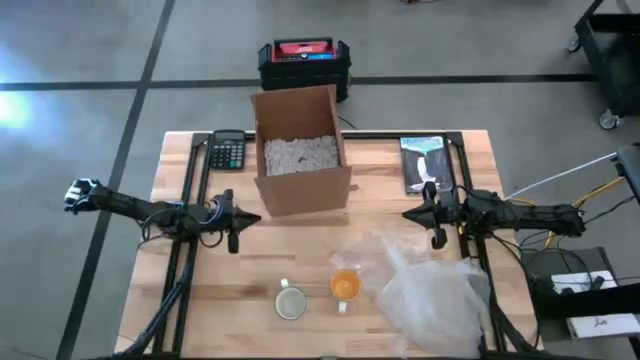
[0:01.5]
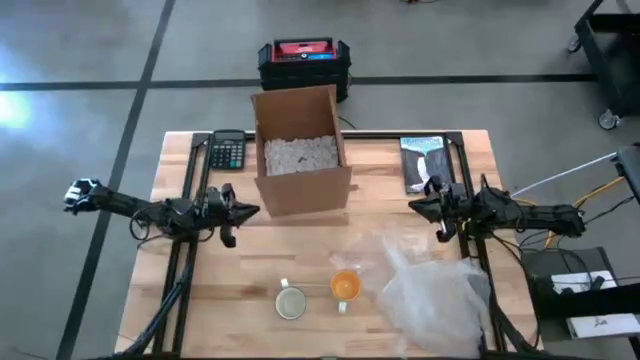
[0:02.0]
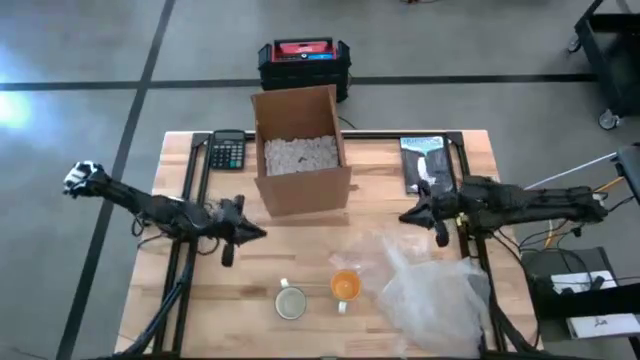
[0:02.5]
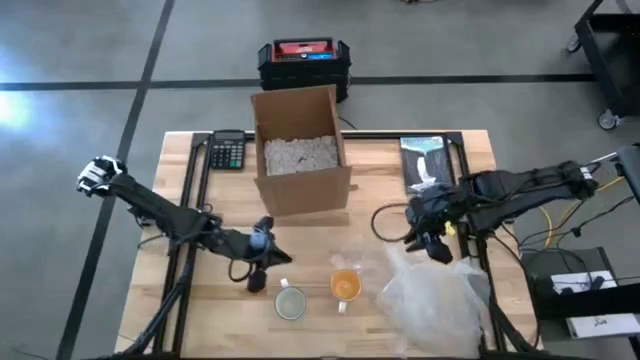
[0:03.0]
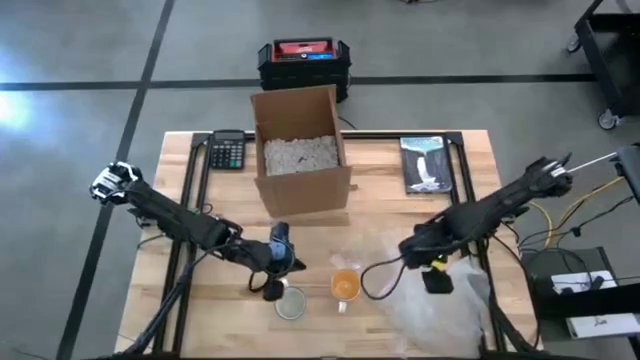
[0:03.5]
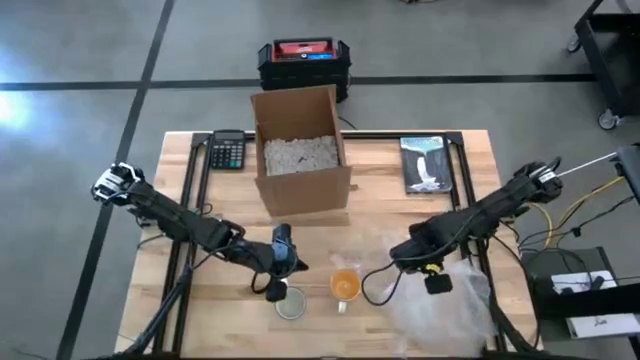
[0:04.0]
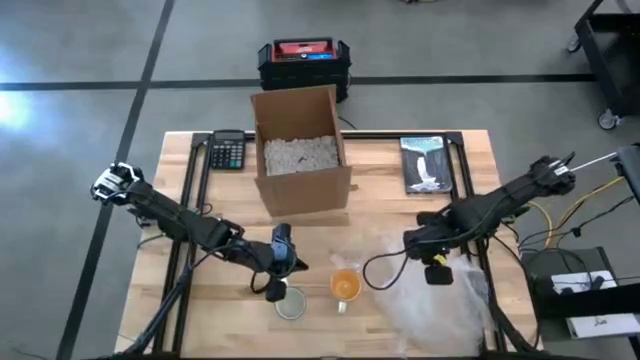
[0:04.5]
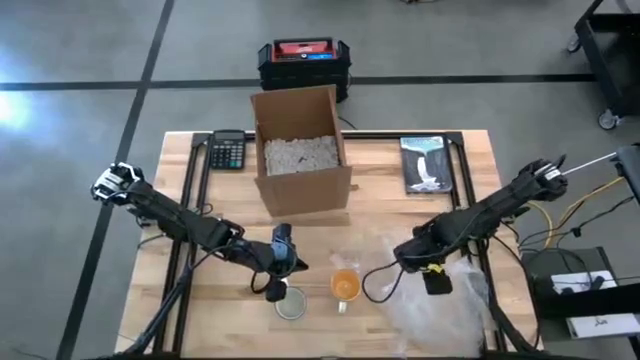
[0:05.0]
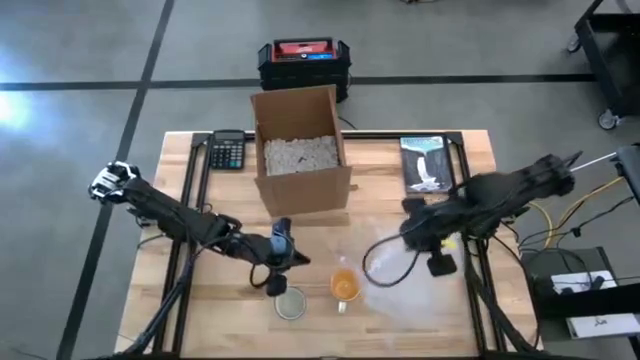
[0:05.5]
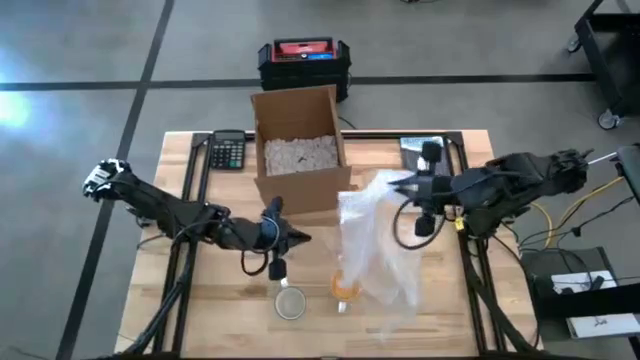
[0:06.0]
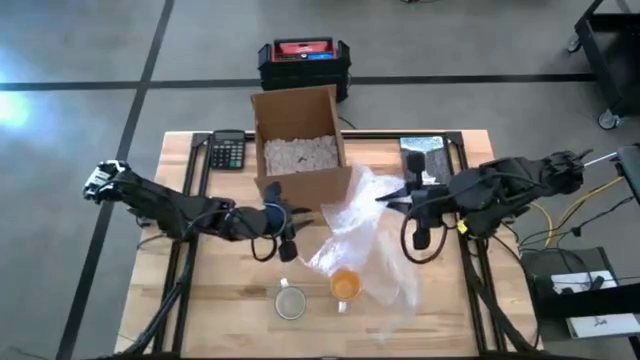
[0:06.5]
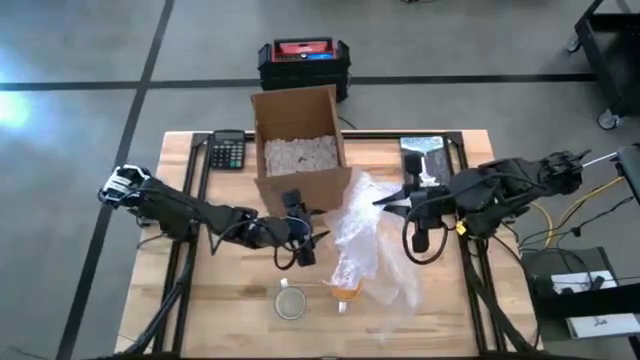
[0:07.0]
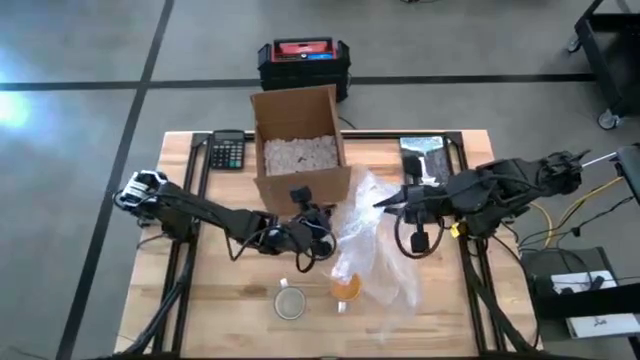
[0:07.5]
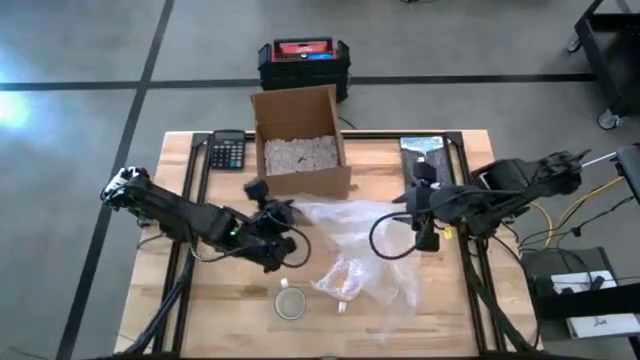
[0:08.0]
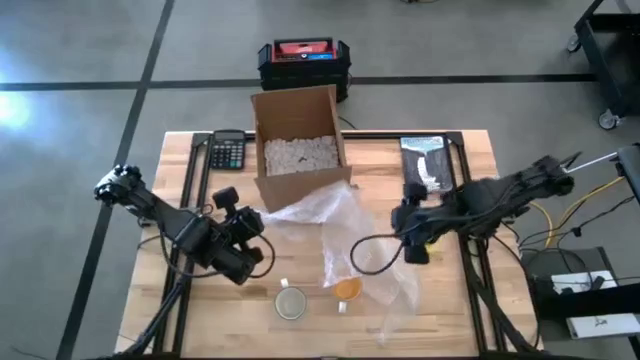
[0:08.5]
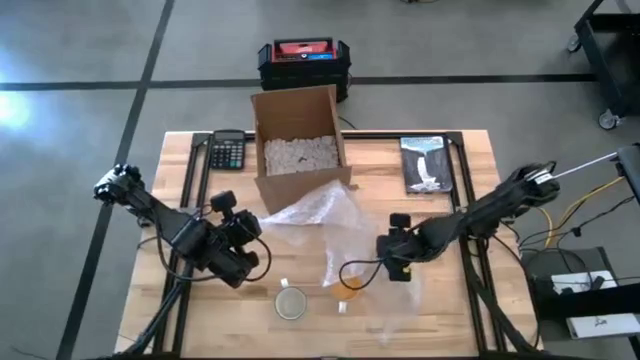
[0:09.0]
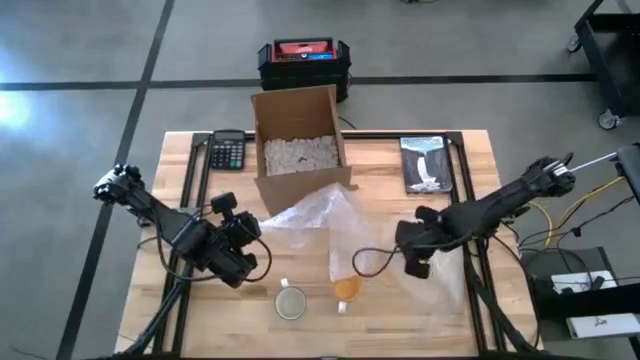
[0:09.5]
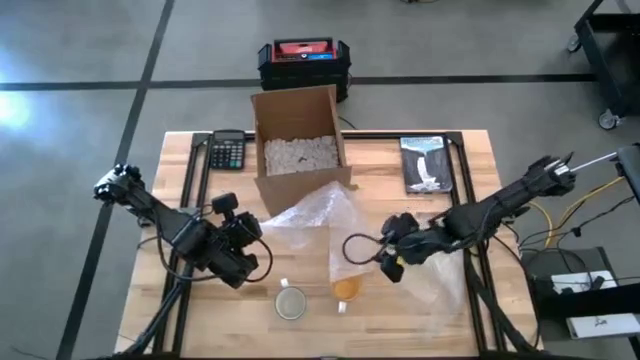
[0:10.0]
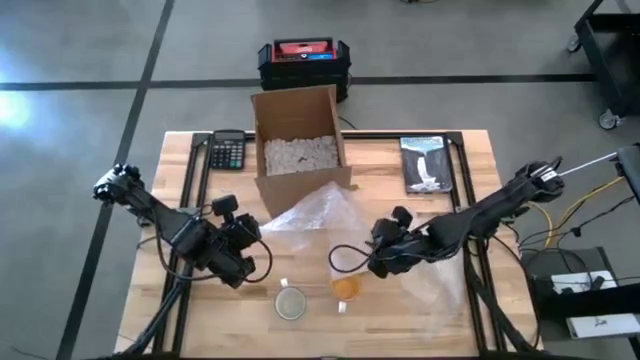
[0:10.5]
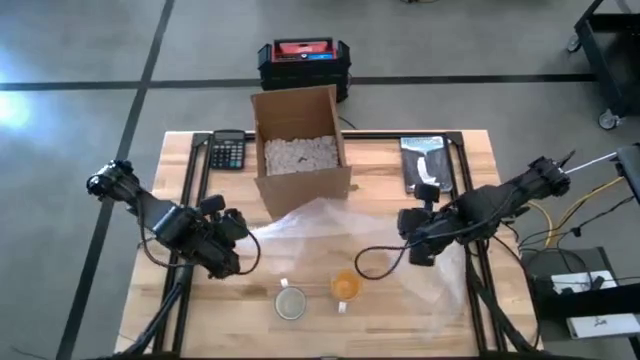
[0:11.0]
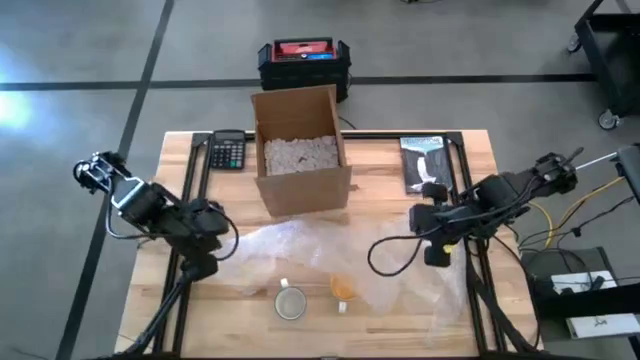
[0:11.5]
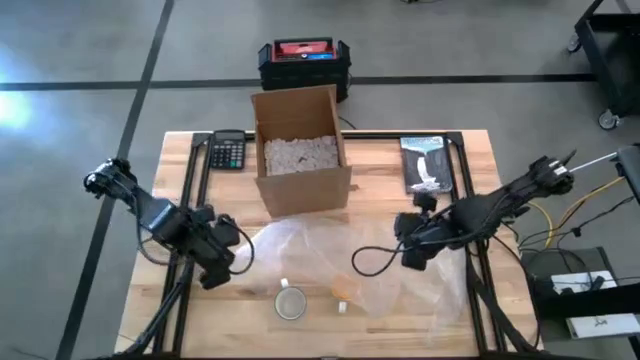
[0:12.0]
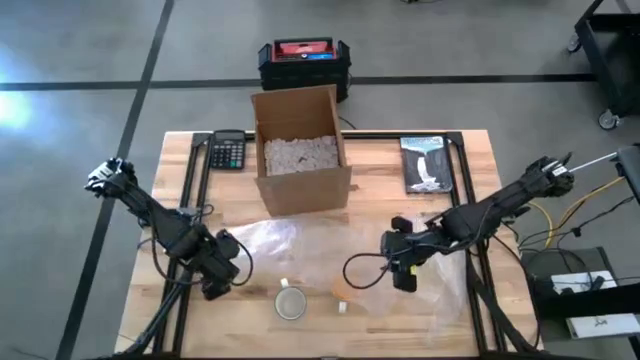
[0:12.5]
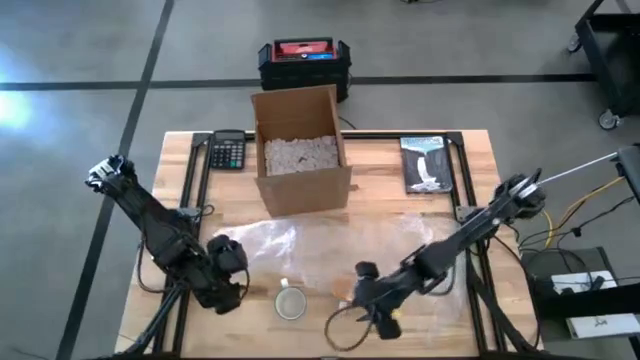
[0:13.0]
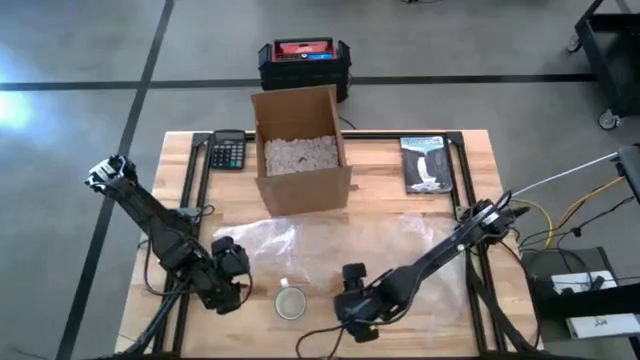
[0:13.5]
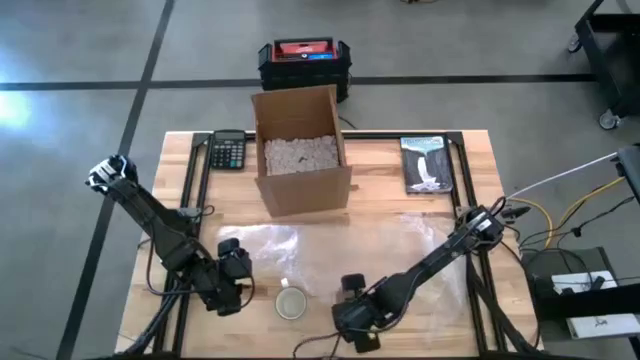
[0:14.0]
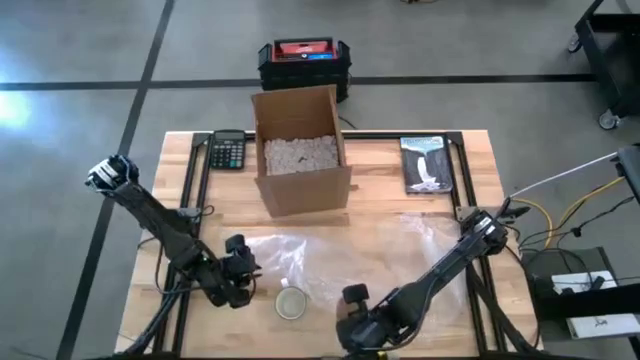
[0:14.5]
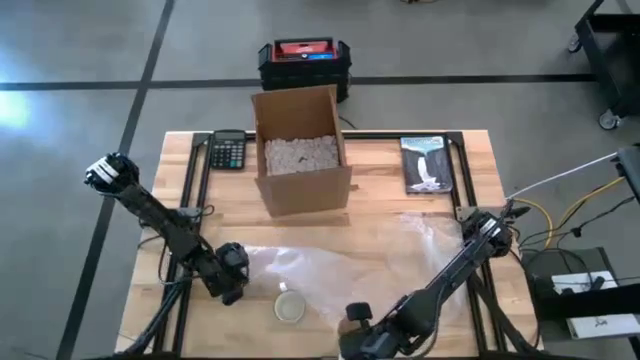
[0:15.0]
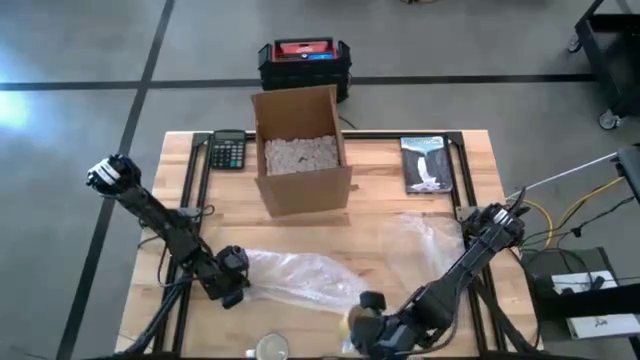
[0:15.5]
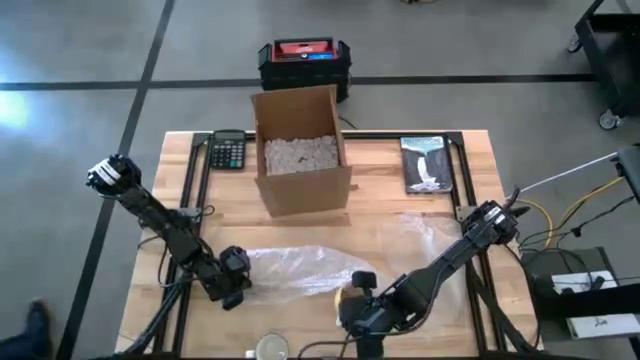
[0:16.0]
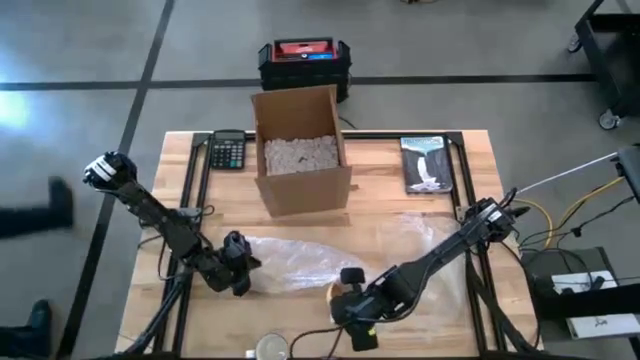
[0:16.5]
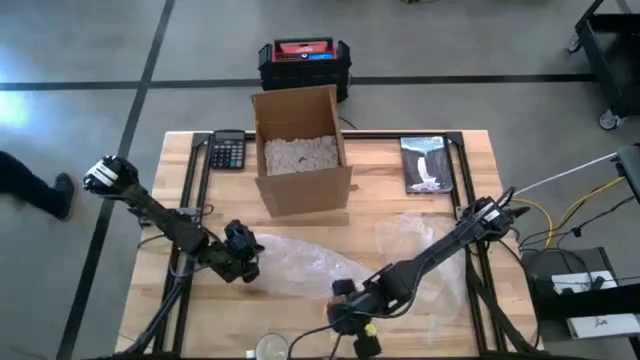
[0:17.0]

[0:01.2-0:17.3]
Task: wrap mug
Prepare the transparent bubble wrap

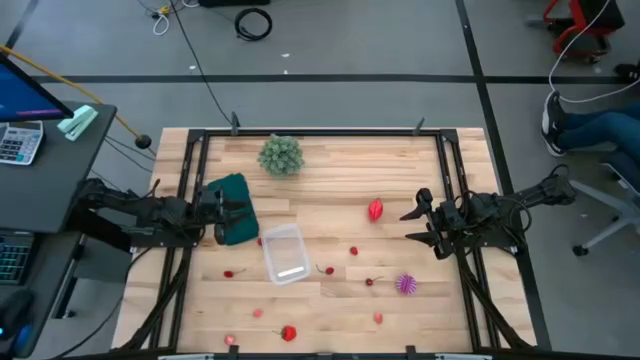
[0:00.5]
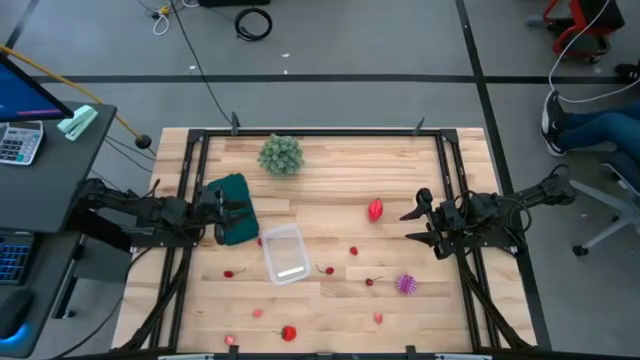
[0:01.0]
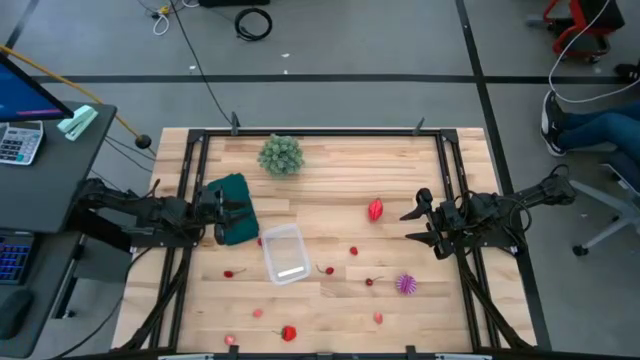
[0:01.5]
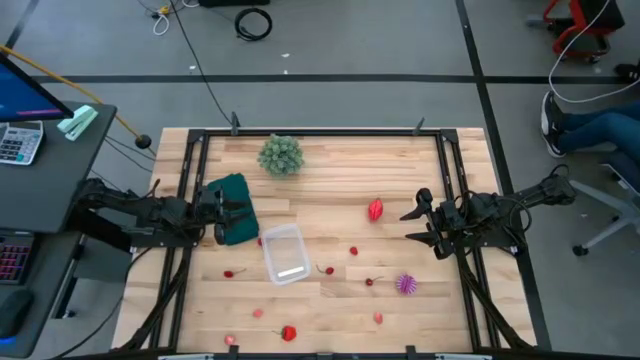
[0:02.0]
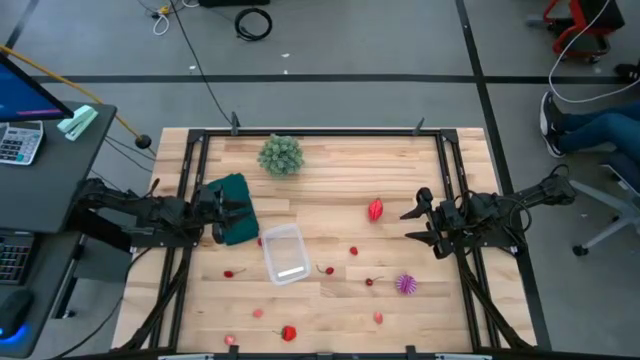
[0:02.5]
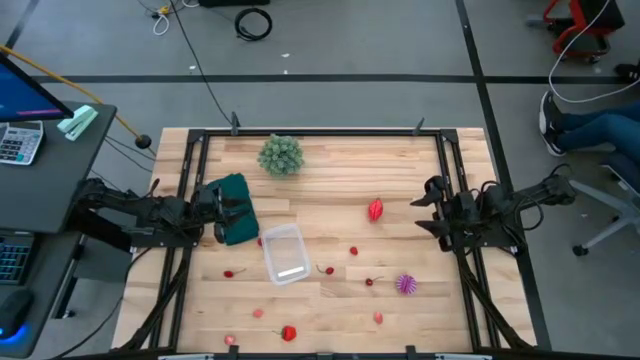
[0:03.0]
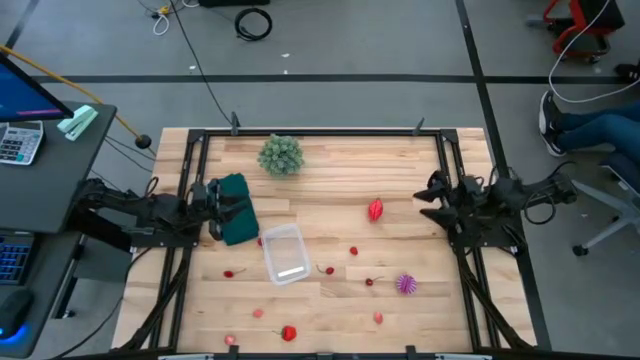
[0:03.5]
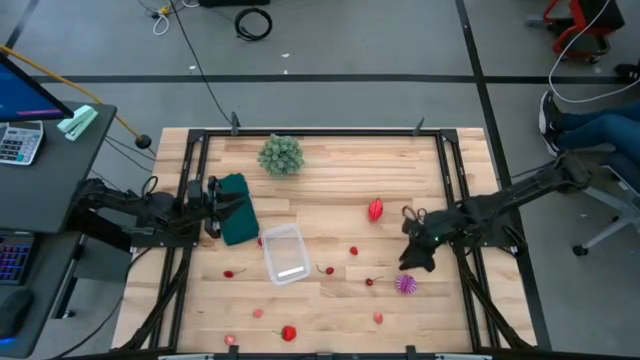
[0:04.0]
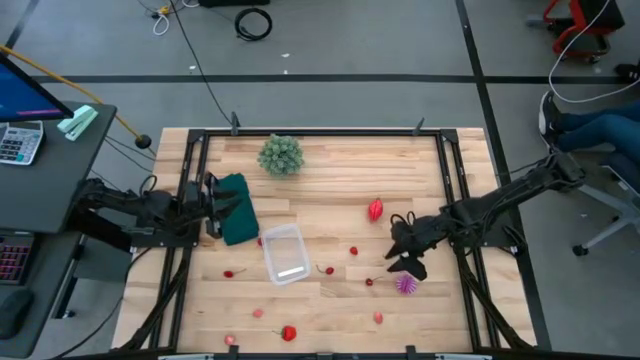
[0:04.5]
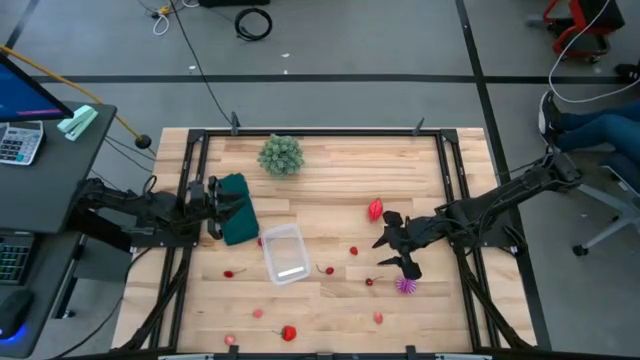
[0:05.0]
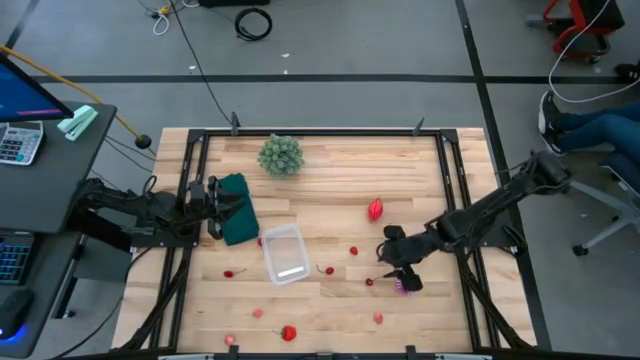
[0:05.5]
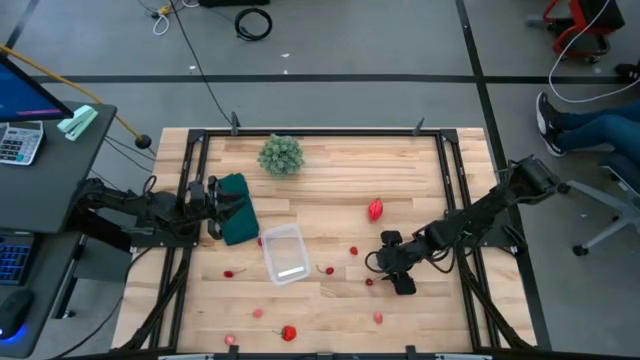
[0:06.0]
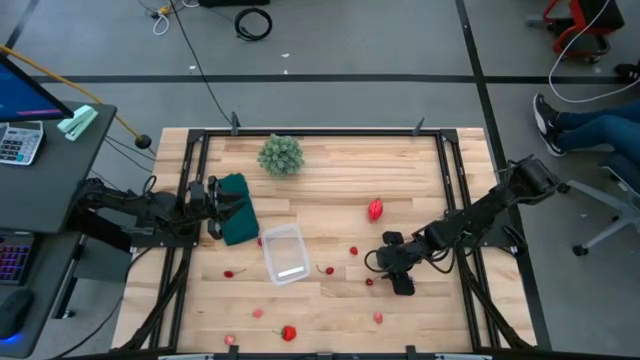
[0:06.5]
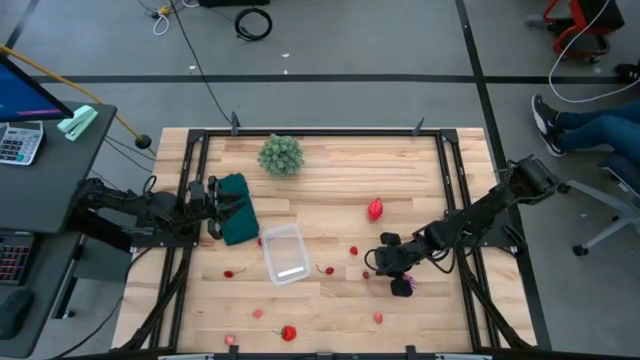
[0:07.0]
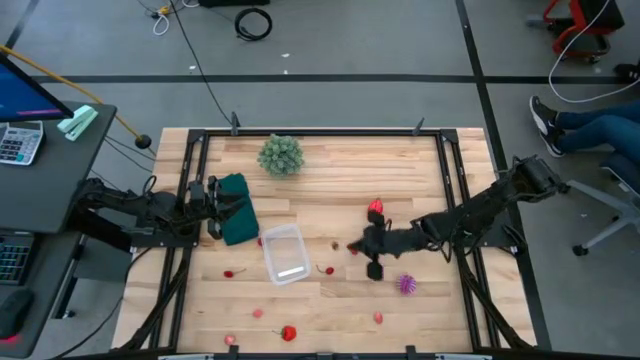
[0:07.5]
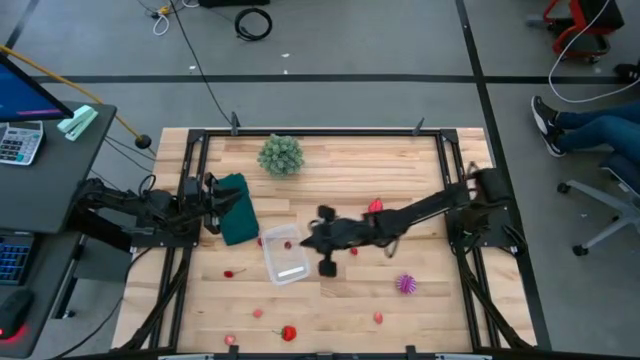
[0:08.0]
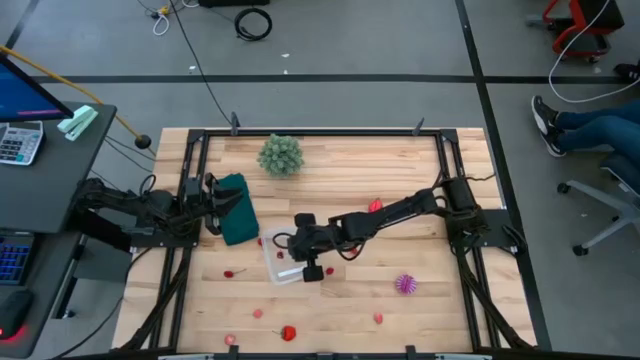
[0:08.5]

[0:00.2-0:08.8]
Task: Pick and placing Produce into tupperware
Put the red cherry into the transparent bin
